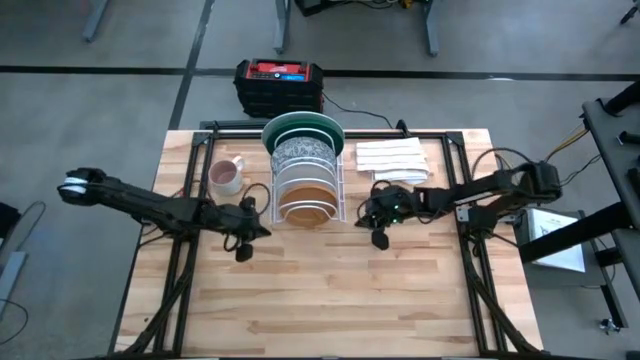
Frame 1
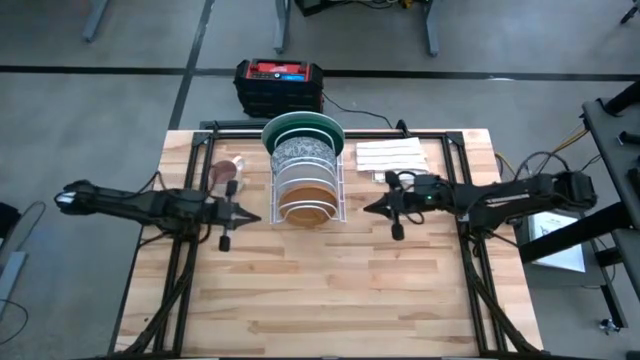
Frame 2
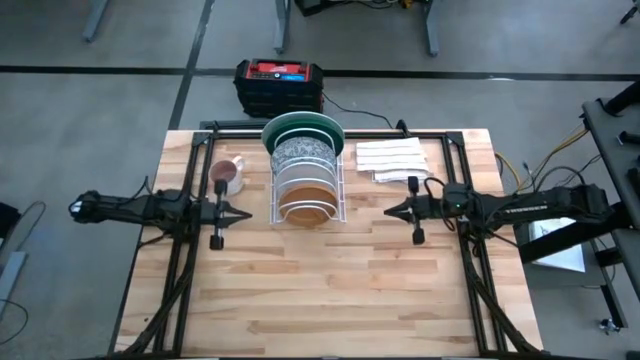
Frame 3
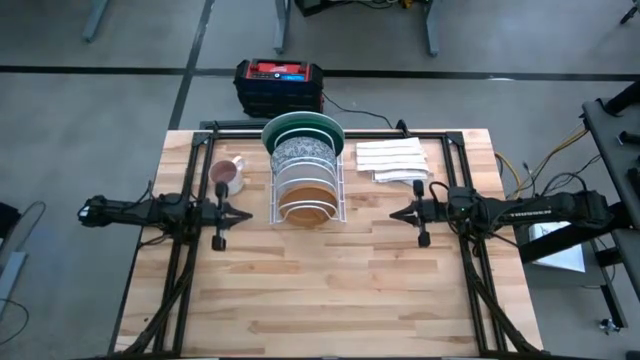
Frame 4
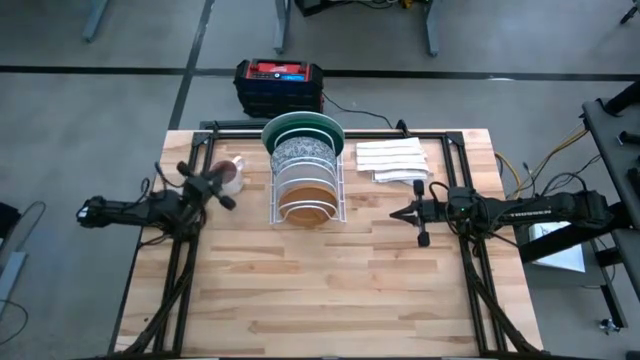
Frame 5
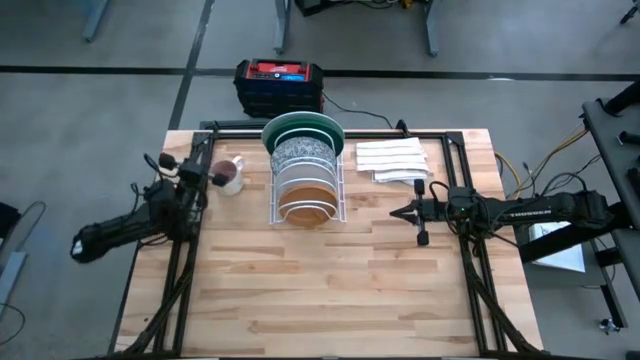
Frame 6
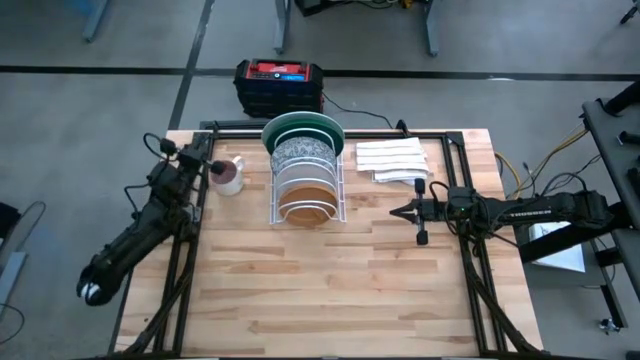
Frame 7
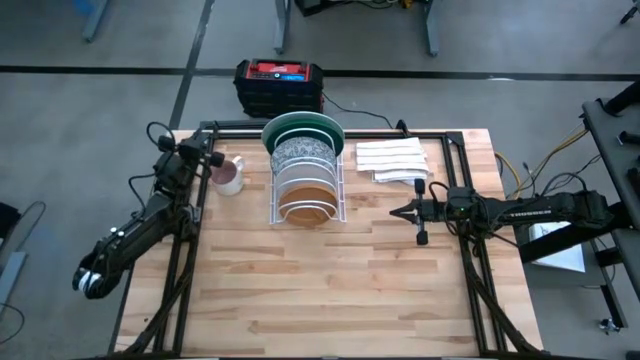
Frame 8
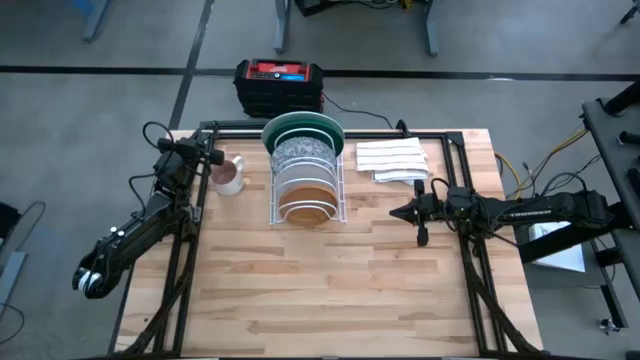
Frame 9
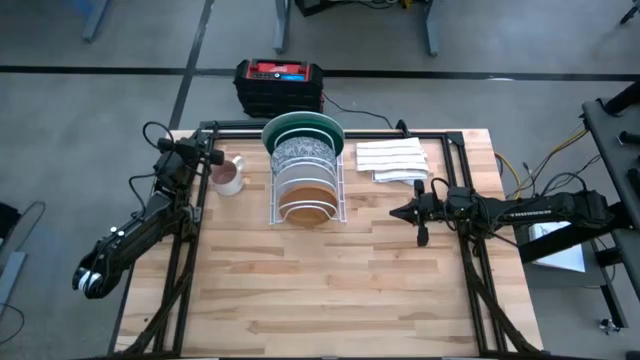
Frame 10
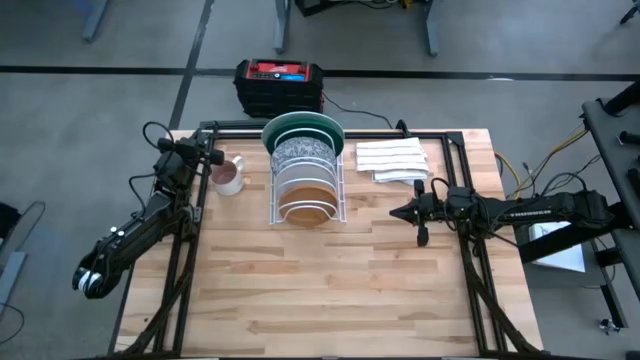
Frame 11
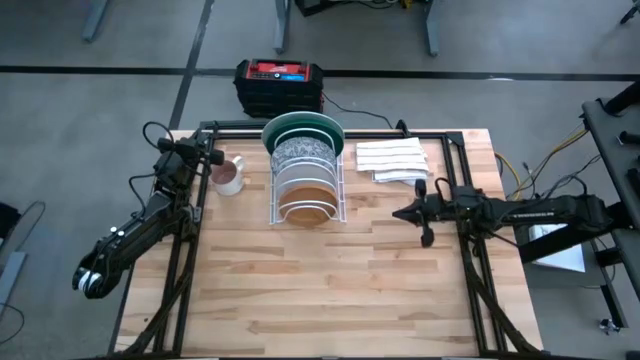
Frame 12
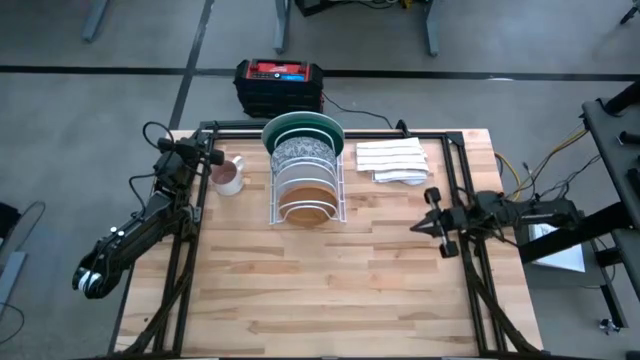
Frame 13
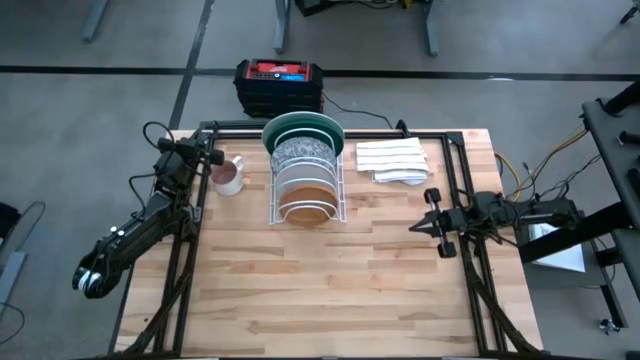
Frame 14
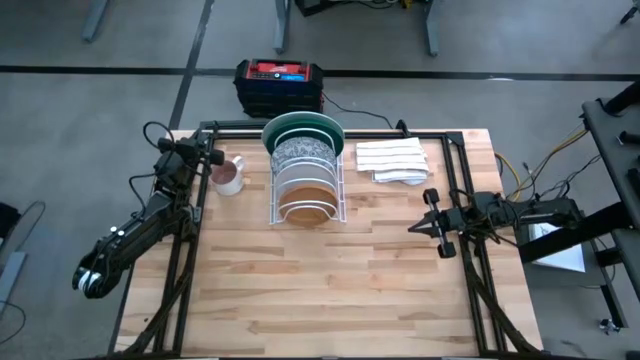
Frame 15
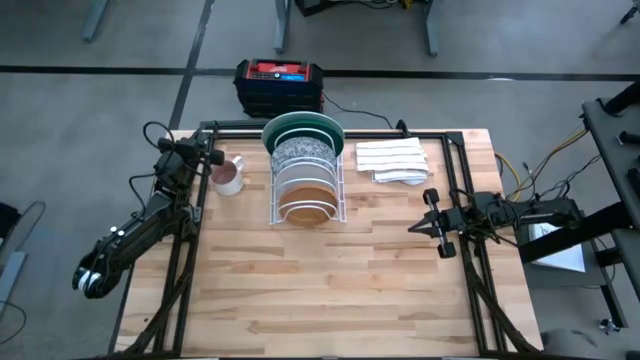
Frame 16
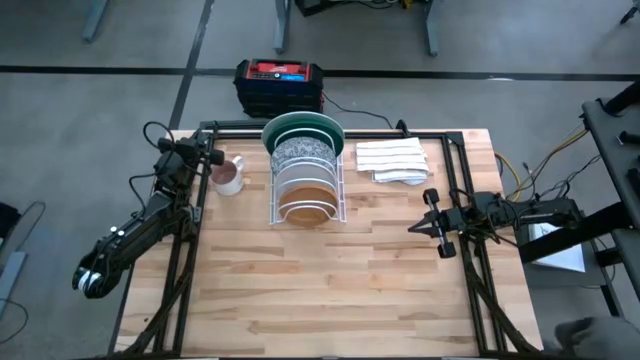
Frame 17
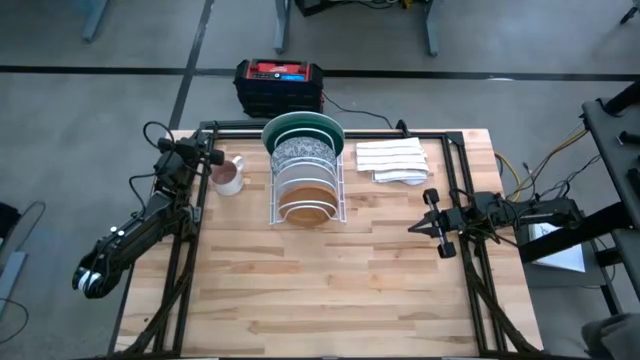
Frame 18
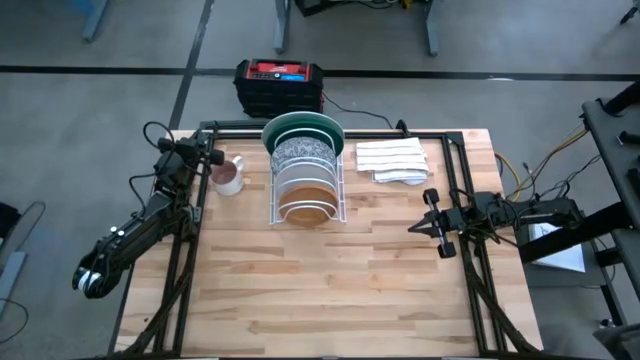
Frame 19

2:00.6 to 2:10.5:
Task: Sort dishes
Return to Home Position

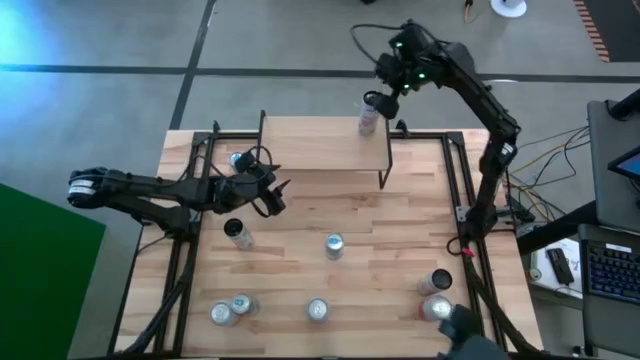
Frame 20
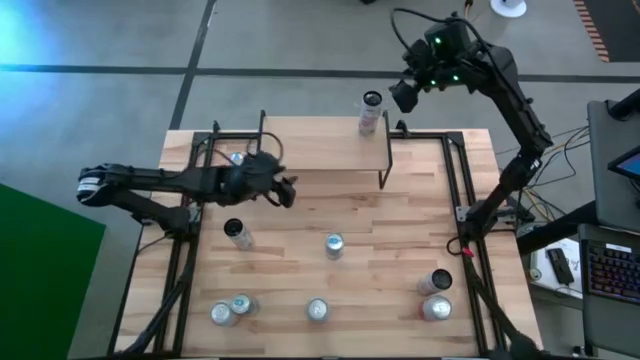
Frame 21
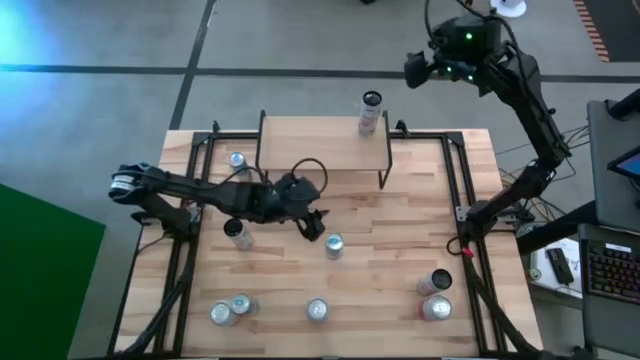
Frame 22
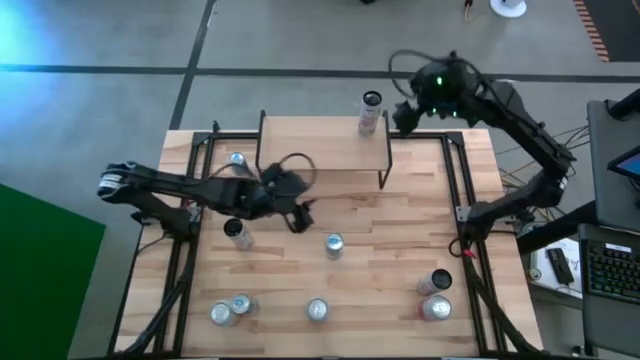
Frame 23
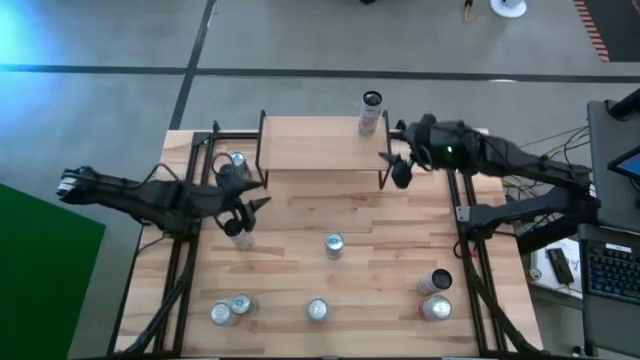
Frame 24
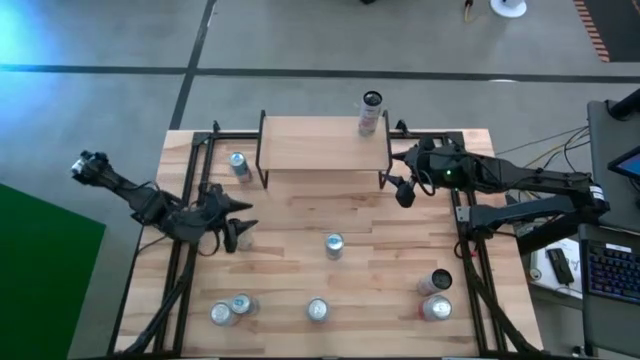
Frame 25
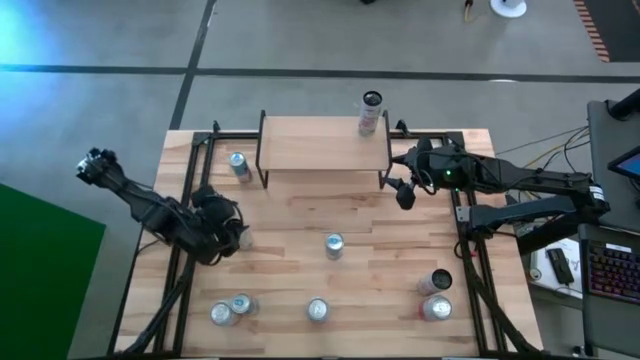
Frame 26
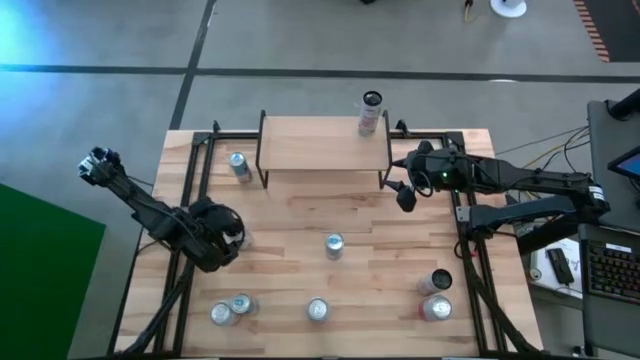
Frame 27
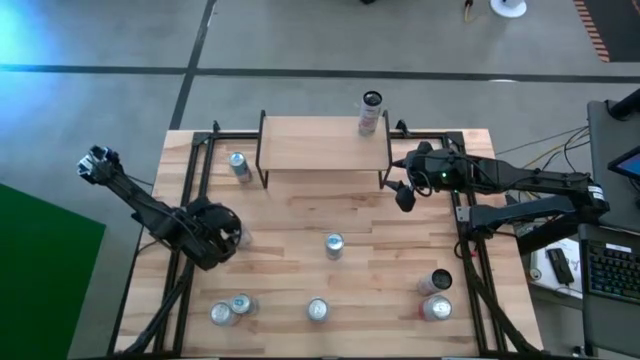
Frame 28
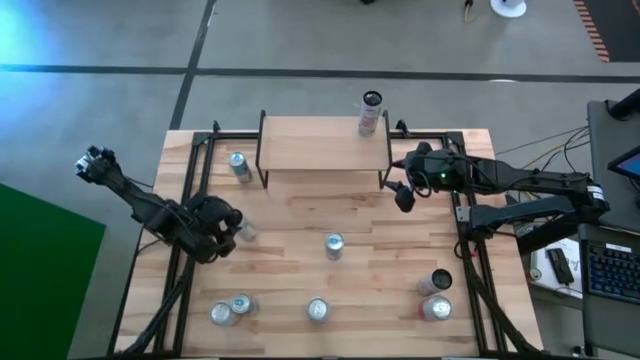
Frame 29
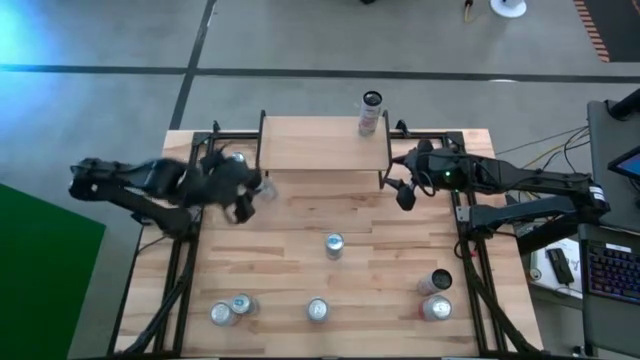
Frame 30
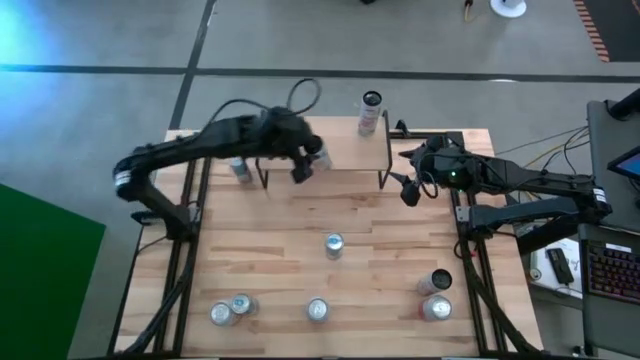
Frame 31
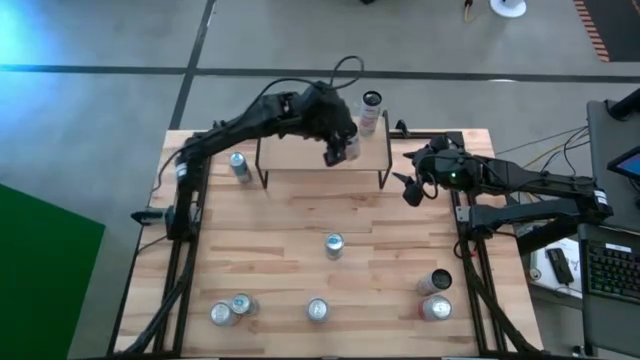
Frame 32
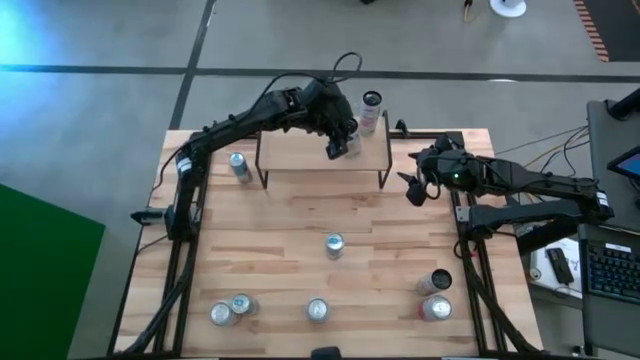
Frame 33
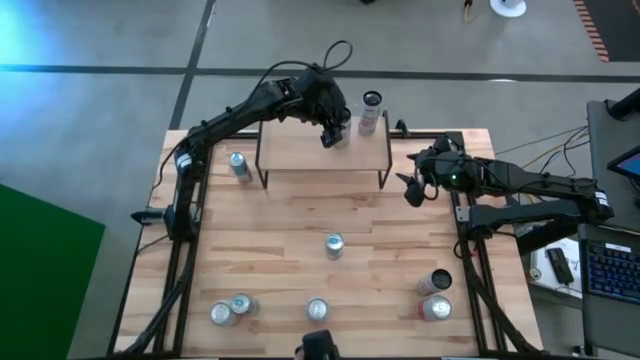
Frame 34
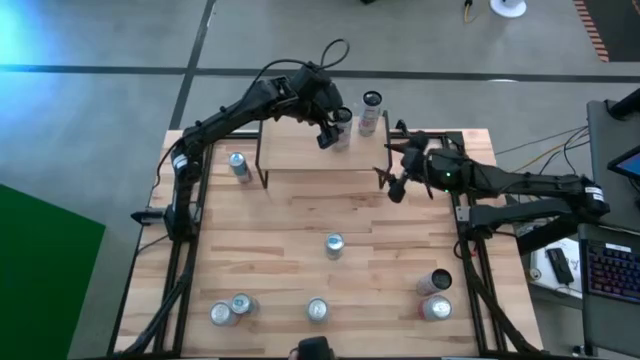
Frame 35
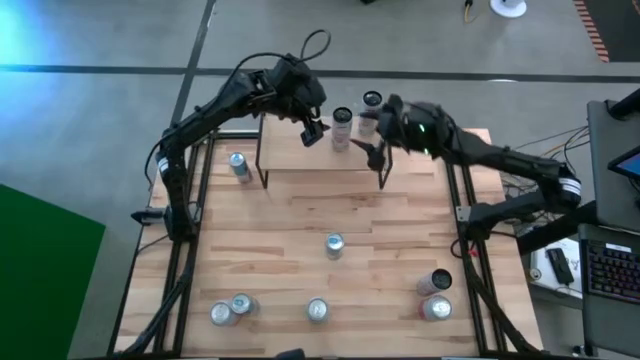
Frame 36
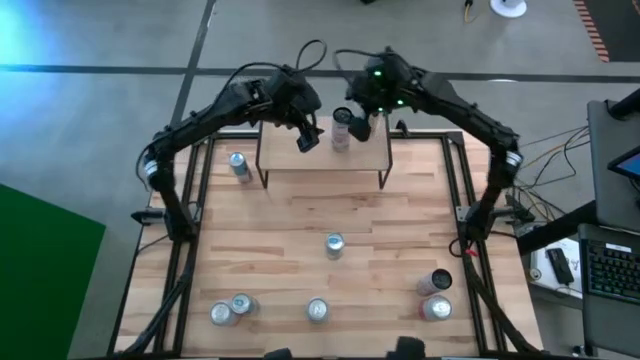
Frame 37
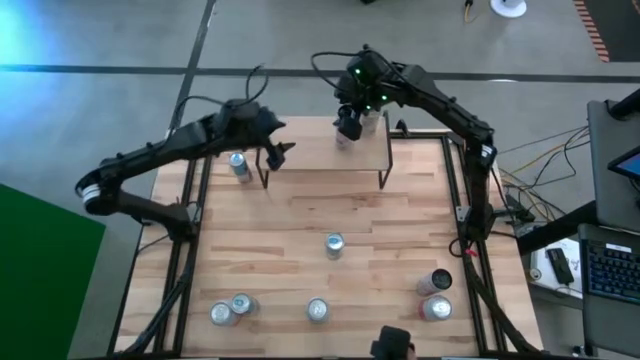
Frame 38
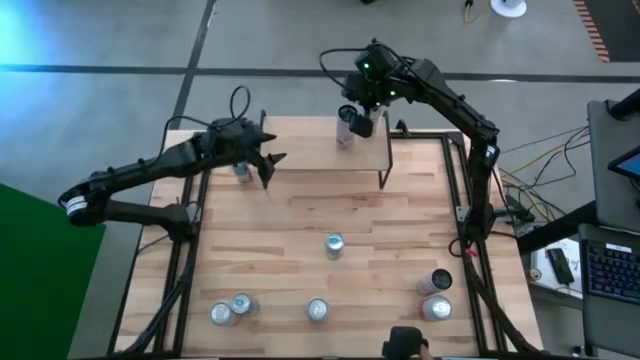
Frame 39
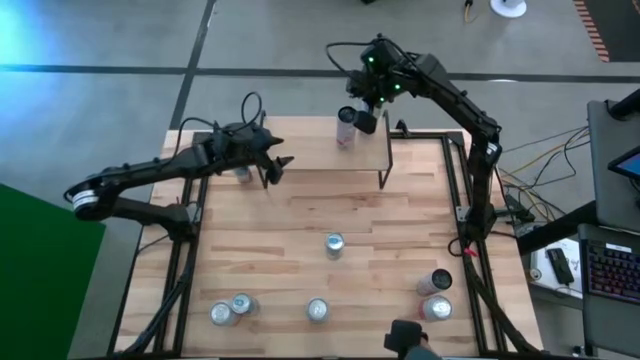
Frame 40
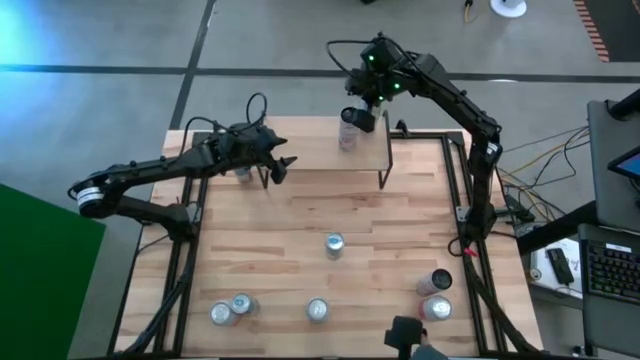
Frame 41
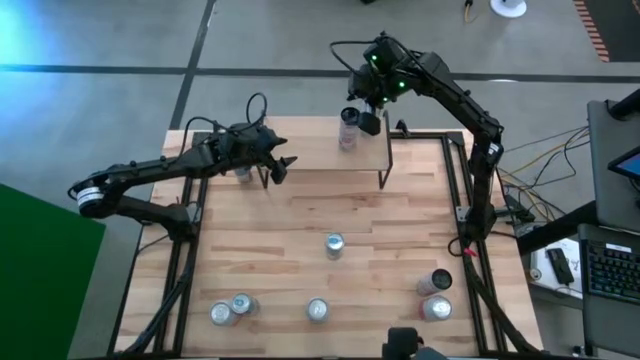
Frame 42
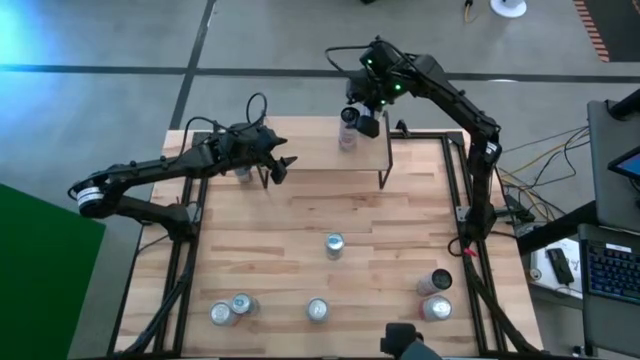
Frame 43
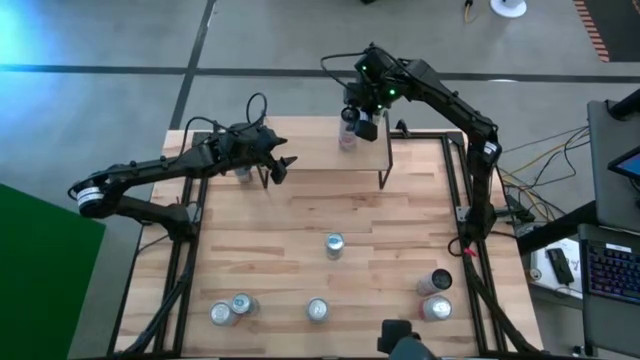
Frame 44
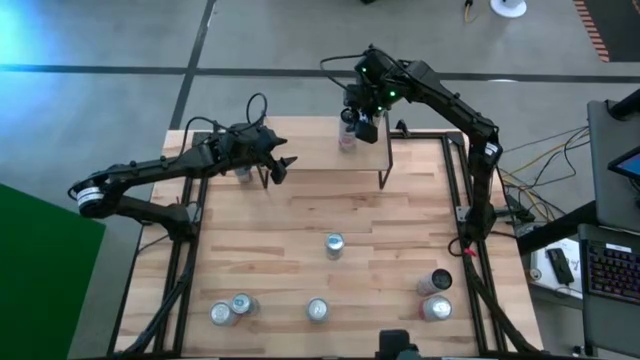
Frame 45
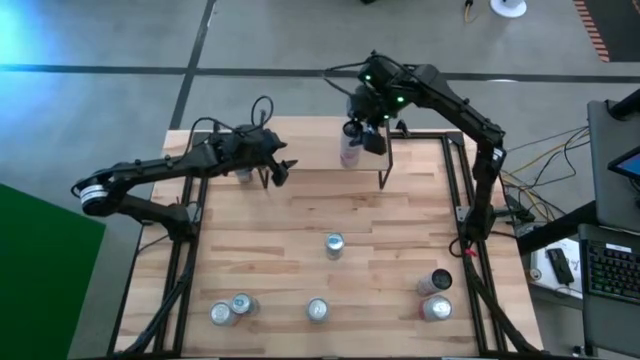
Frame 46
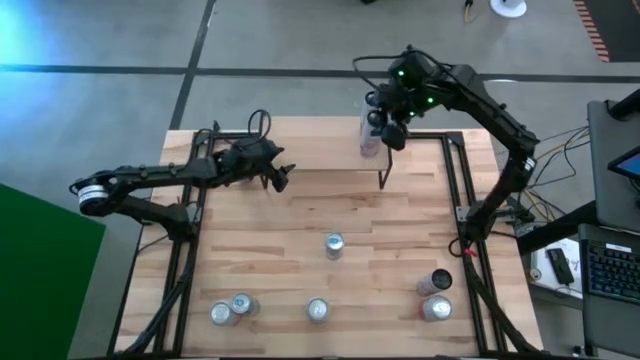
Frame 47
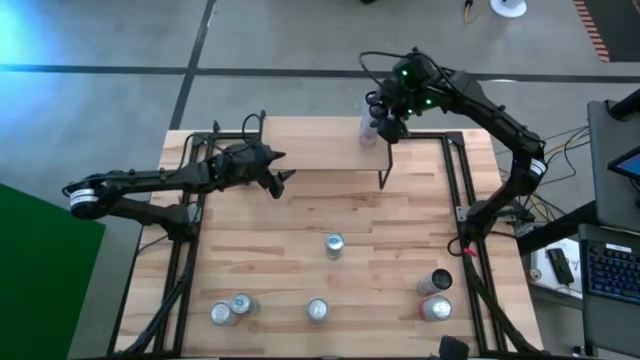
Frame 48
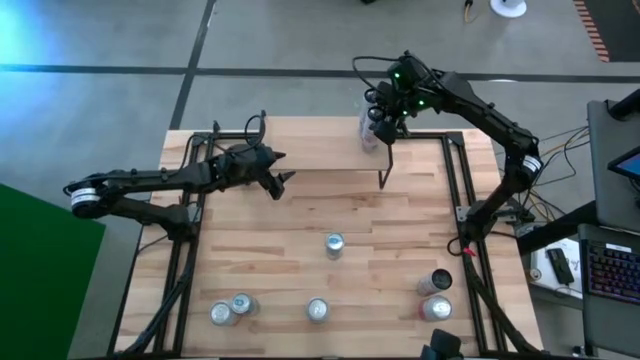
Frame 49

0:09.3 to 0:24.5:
Task: Place canned beverage on shelf
Put the top white soda can on the shelf aligned with the other white soda can
